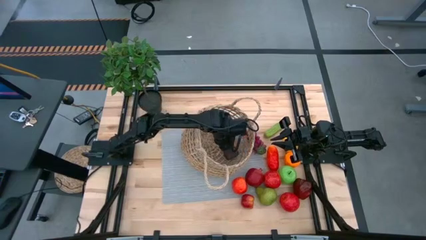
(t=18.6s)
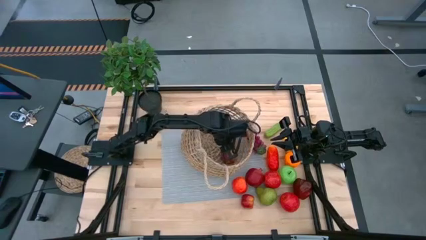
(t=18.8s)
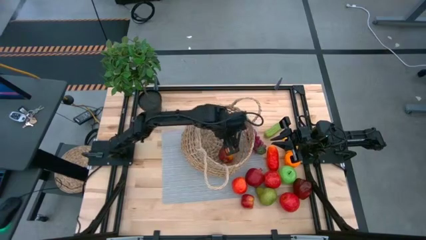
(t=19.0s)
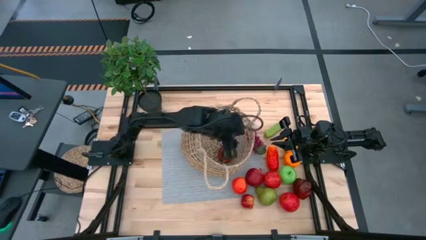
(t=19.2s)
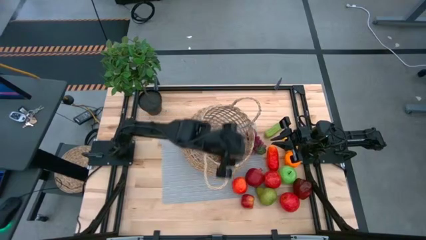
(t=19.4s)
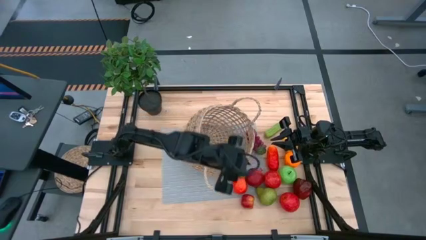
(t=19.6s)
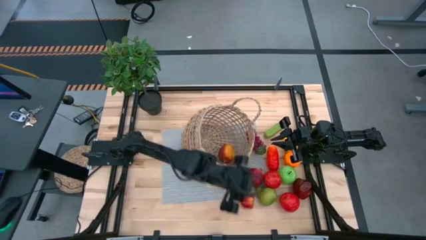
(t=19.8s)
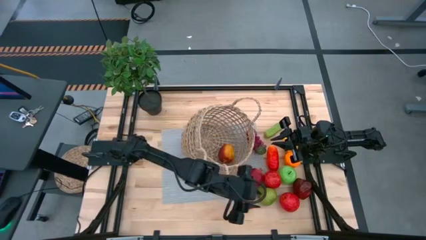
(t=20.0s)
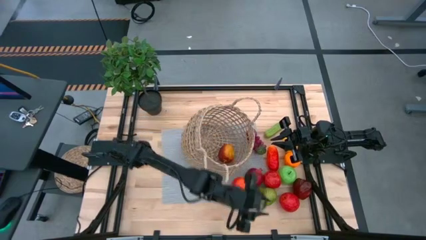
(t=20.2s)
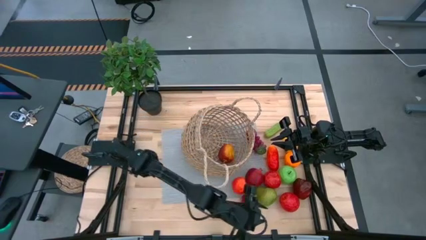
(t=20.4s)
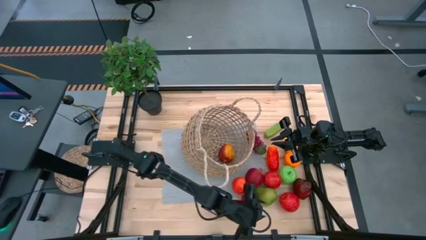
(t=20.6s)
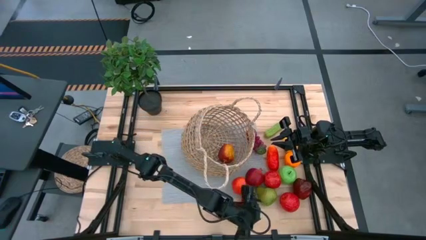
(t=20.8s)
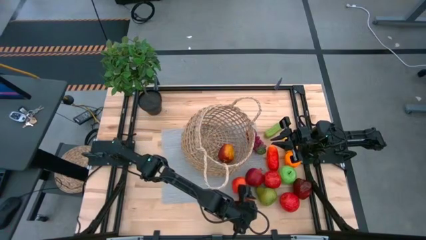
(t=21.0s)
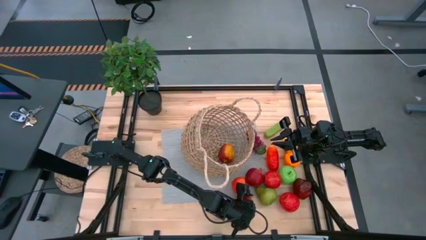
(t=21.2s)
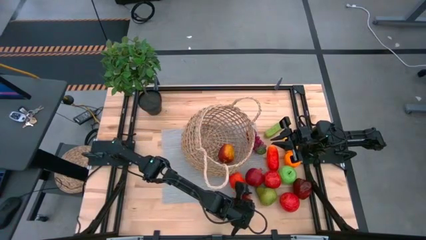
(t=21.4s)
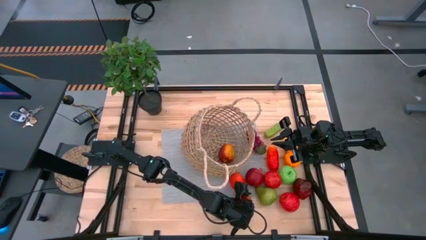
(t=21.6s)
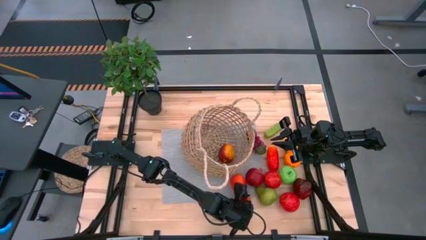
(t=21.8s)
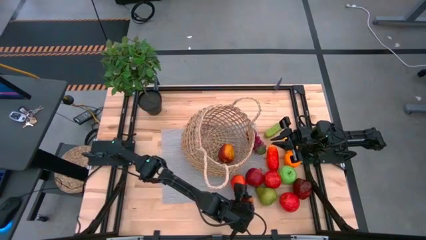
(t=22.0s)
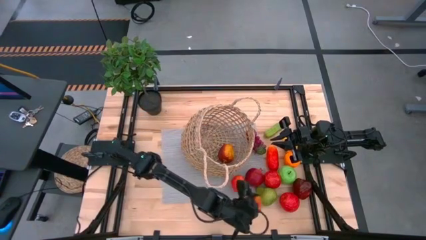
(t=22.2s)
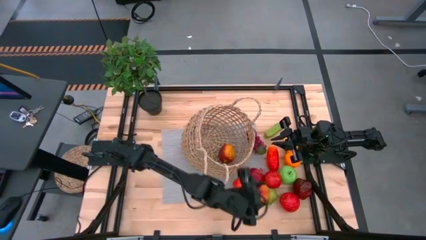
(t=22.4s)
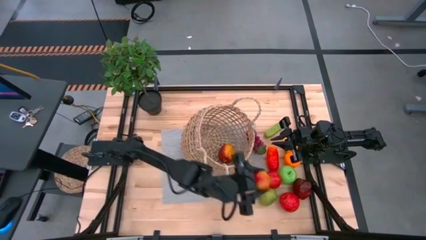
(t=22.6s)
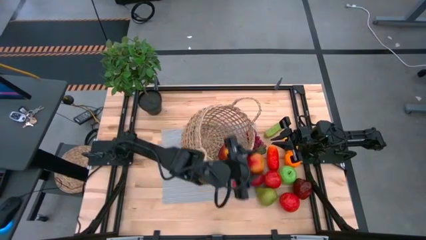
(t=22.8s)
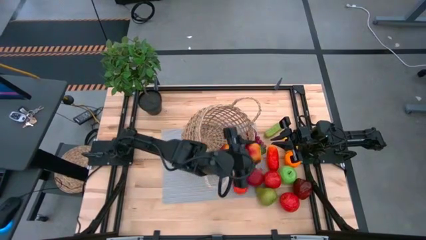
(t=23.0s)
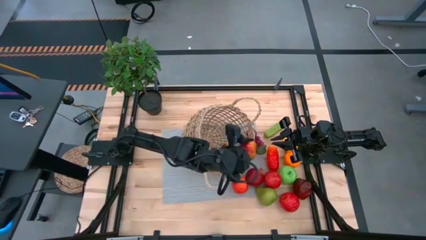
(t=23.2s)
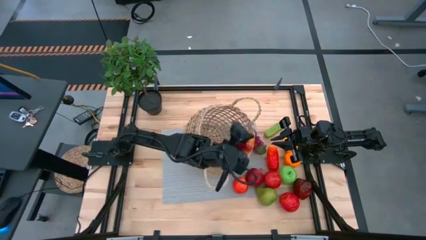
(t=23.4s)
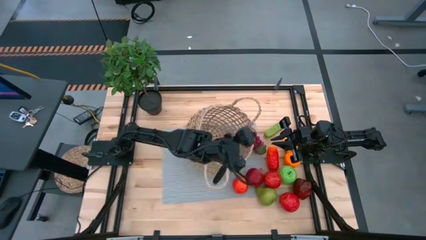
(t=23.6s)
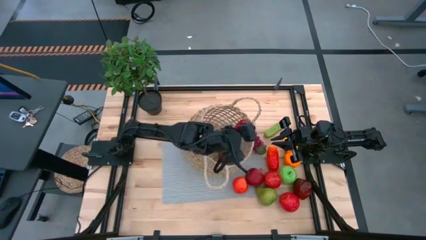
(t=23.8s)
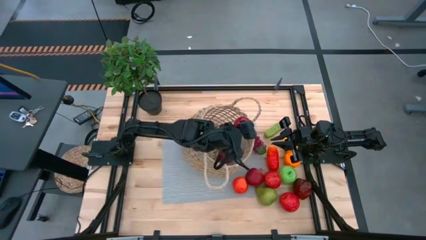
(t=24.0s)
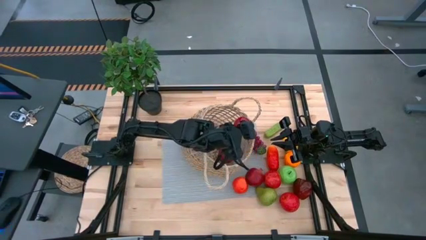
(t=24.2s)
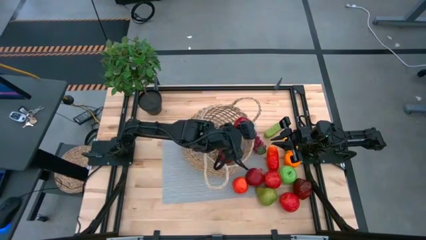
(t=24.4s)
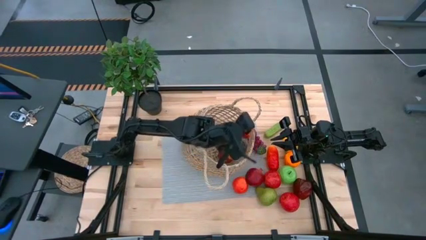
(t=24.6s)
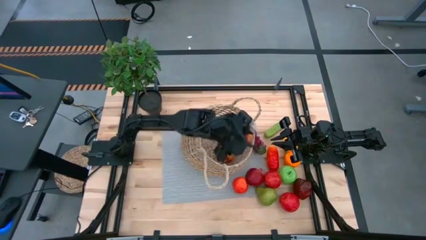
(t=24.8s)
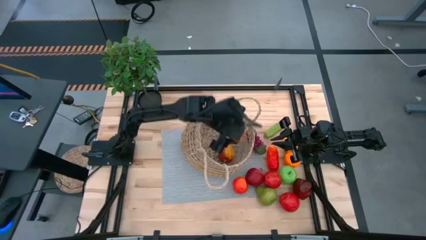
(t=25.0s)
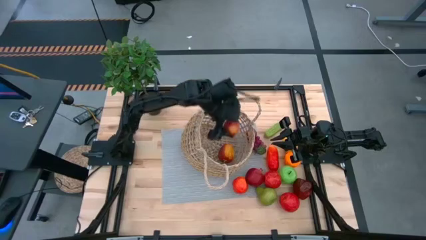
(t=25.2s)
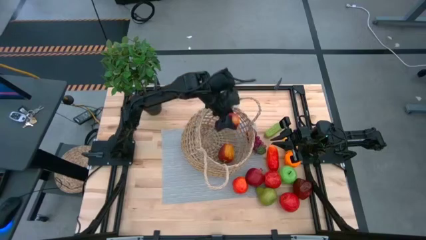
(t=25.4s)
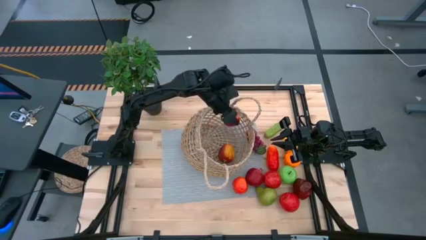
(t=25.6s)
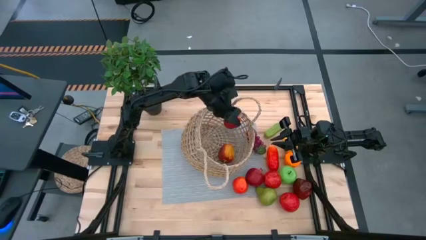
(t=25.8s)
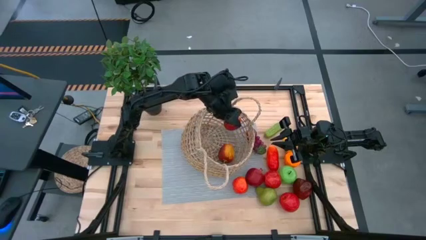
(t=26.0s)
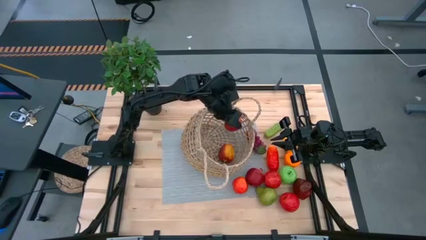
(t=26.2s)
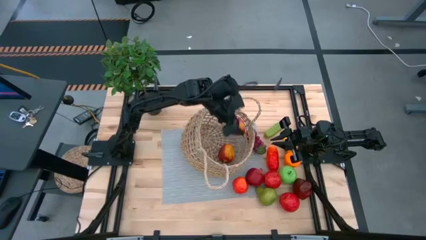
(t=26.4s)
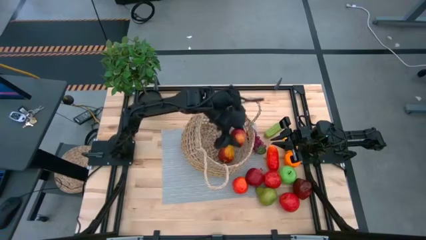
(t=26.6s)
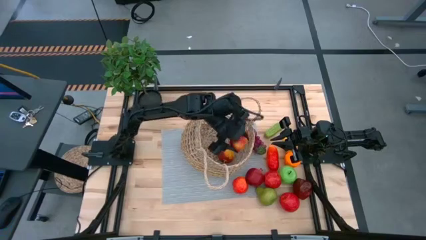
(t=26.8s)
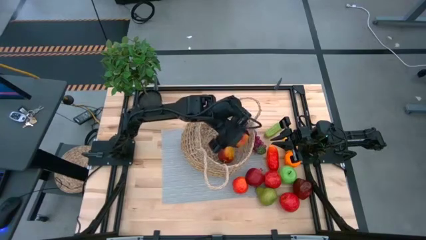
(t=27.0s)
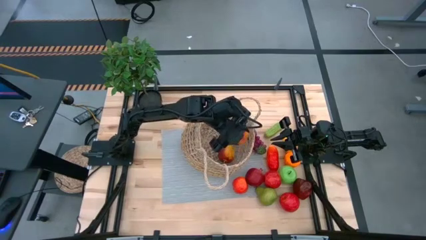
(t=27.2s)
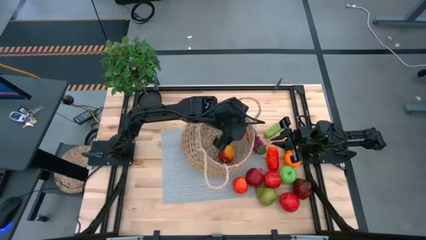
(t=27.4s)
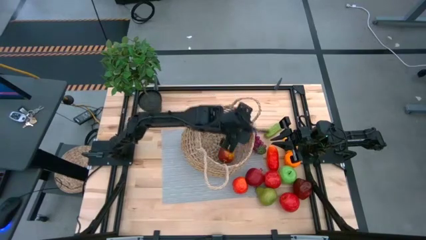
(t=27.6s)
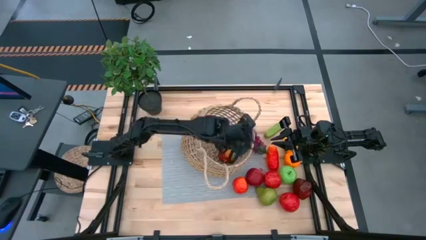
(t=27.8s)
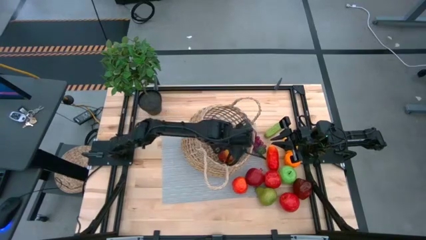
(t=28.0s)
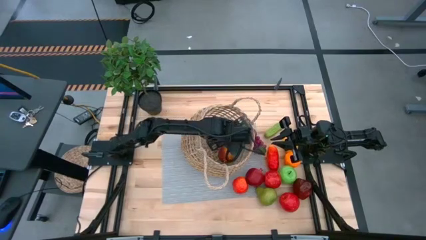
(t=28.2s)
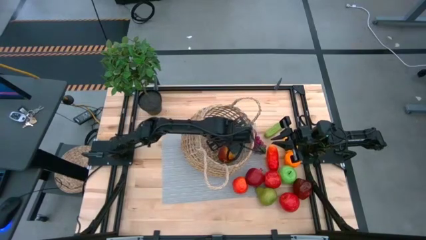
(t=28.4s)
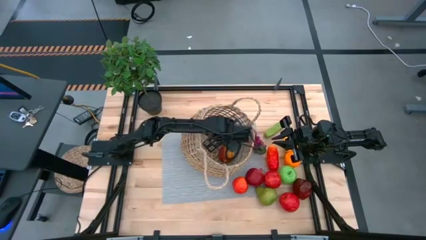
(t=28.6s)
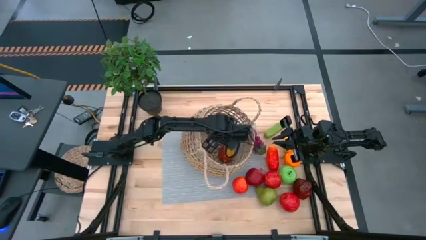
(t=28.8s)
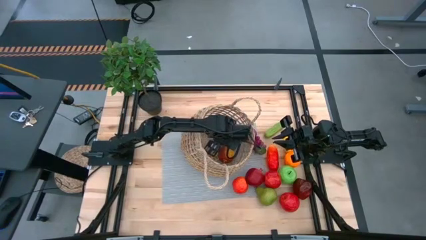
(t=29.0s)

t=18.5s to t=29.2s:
Task: Build produce basket
Put the red apple into the brown basket
